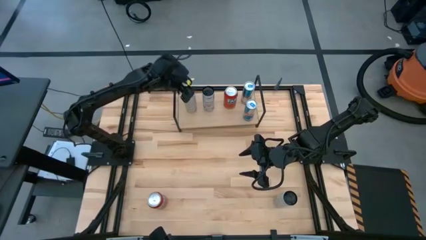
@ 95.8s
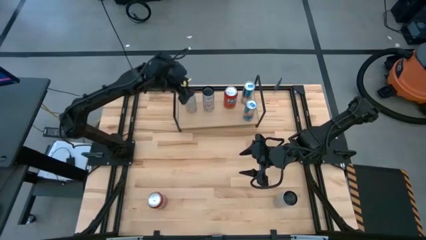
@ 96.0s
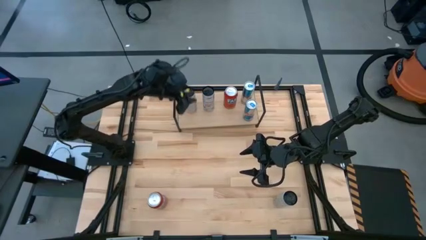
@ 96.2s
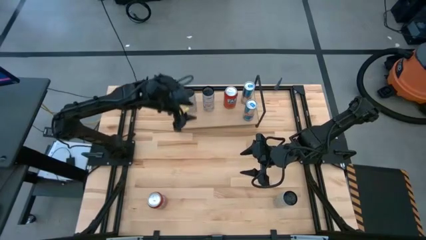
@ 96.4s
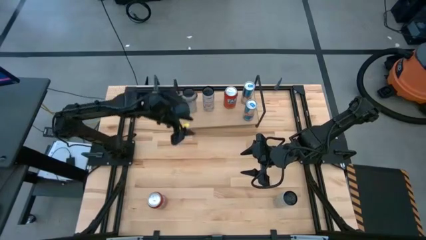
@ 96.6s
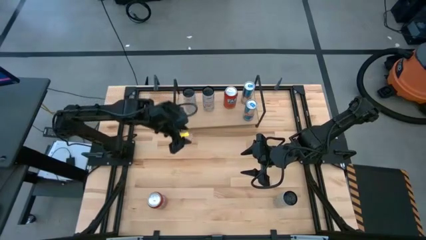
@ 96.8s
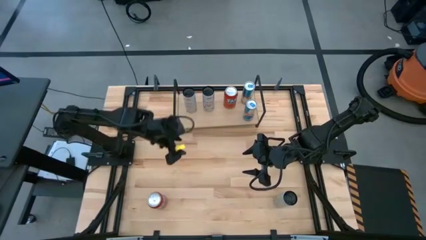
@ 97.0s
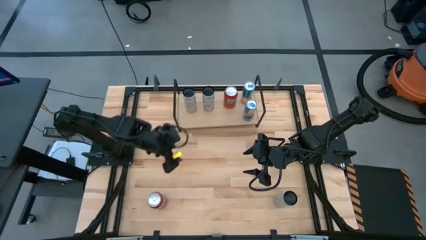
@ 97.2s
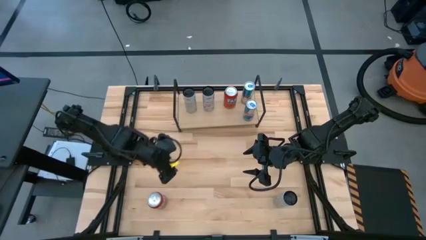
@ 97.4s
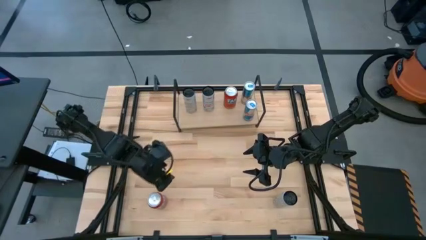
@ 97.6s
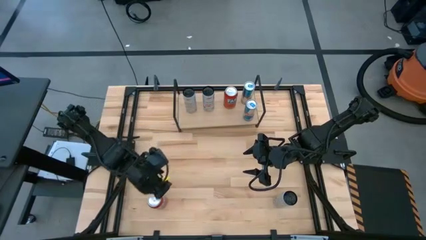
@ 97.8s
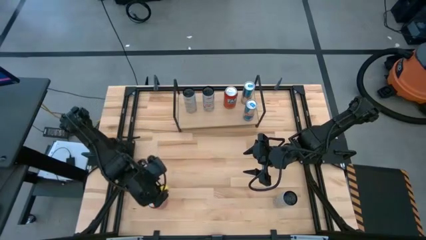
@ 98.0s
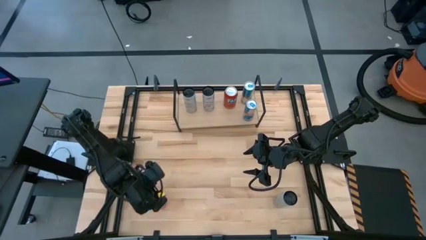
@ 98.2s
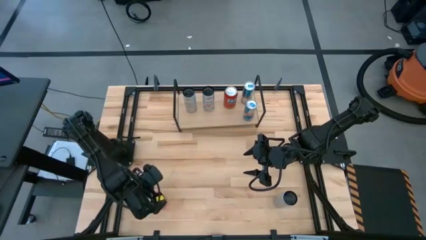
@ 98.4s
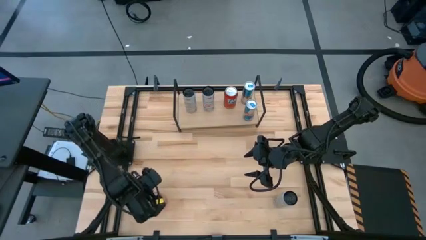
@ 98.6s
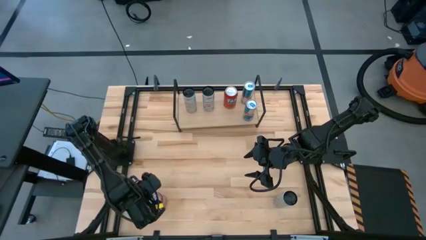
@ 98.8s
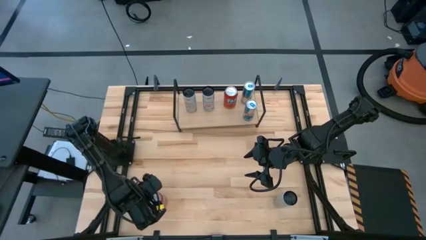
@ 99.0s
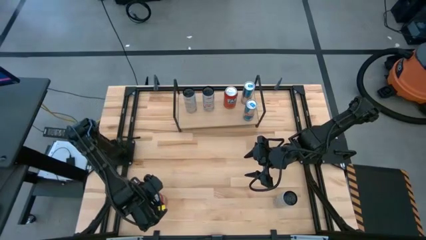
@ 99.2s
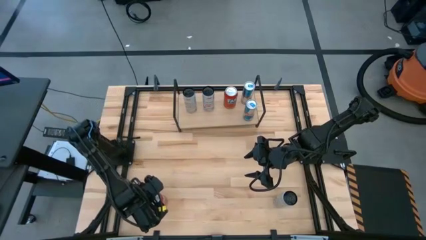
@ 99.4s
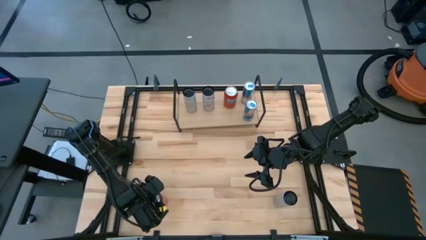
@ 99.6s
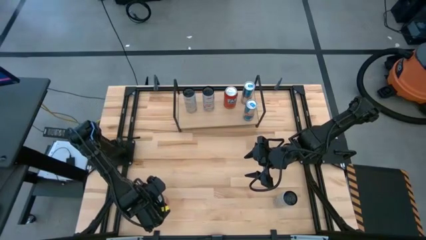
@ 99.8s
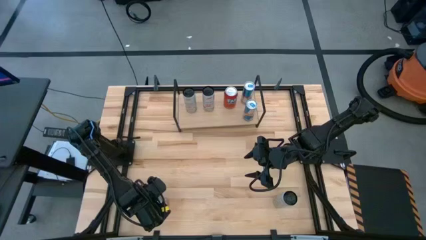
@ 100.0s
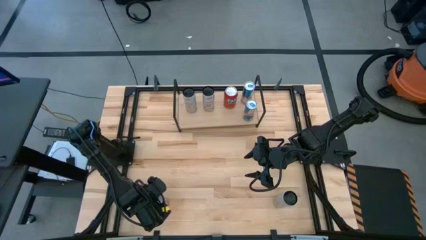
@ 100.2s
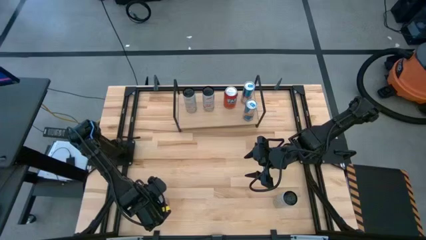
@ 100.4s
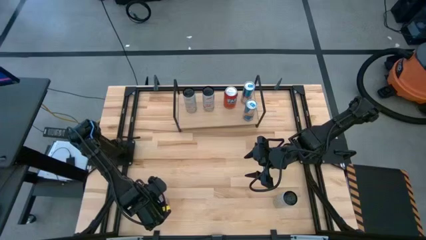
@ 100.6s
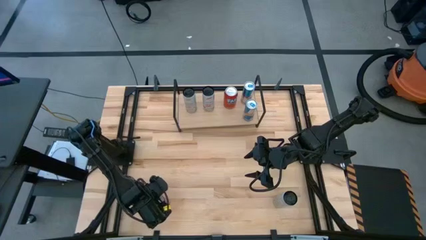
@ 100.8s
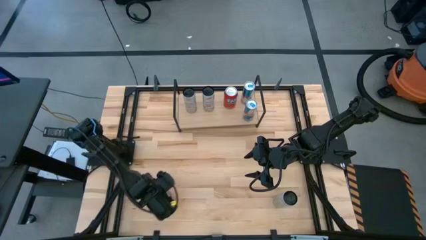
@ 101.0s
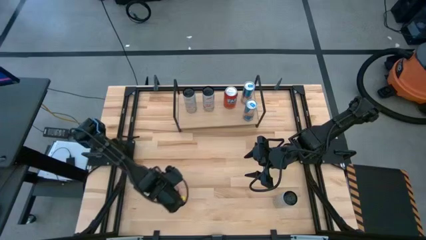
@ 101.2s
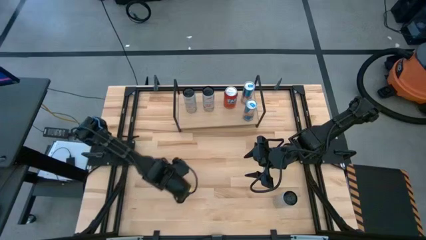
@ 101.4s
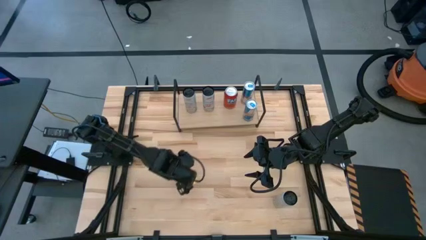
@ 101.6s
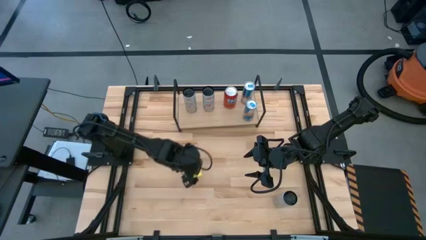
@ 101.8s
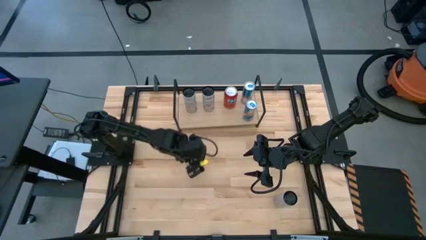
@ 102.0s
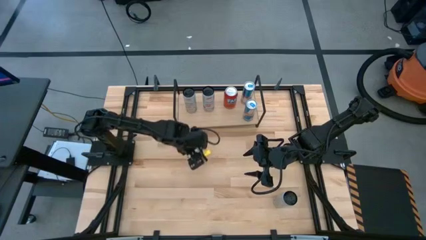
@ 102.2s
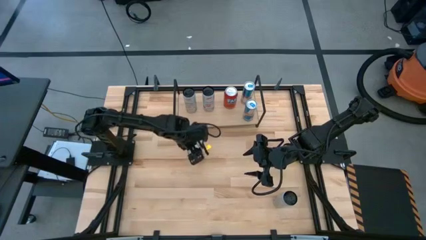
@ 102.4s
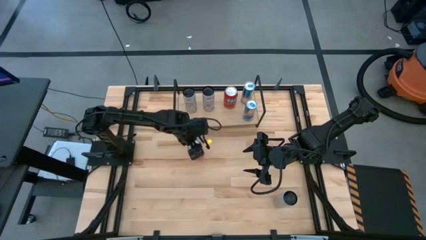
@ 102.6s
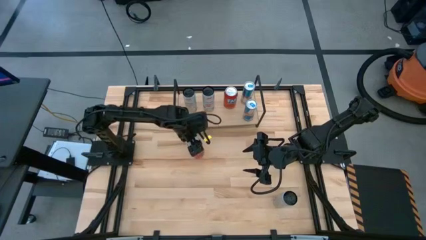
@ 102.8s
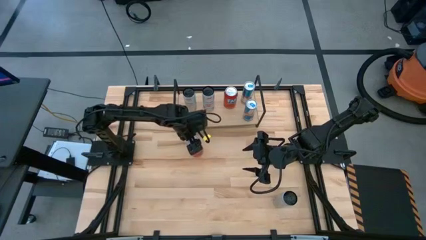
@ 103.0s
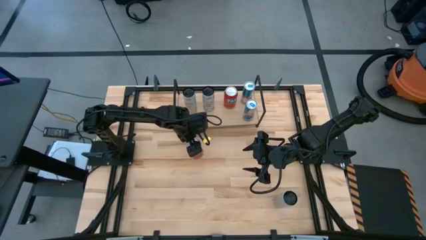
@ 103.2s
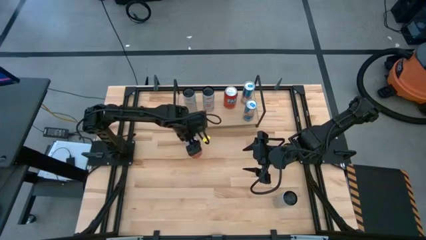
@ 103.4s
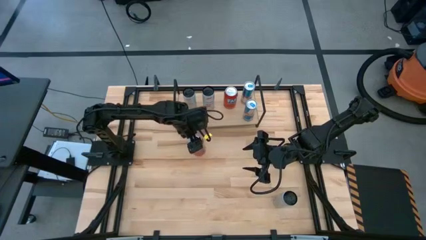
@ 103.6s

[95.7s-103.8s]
Task: Place canned beverage on shelf
Put the orange soda can aligned with the other orange soda can on the shelf

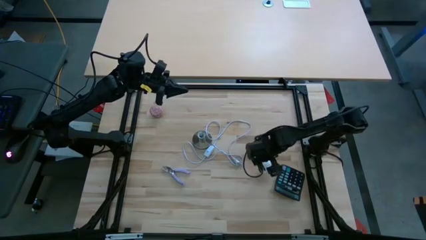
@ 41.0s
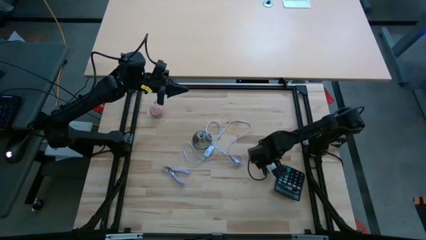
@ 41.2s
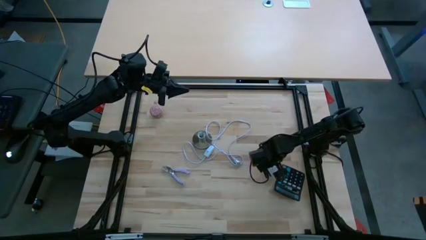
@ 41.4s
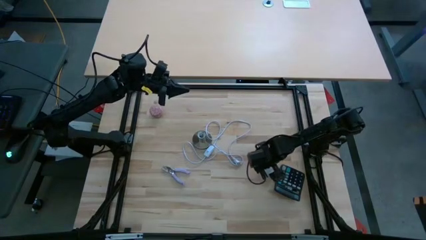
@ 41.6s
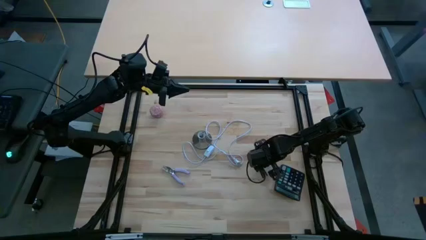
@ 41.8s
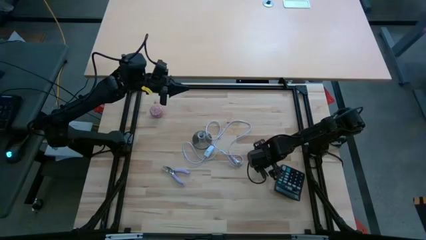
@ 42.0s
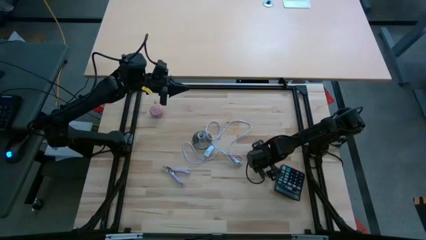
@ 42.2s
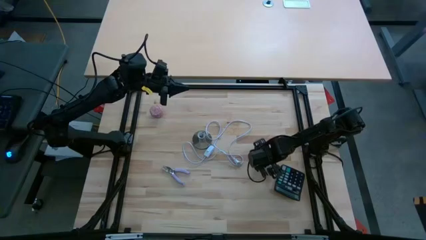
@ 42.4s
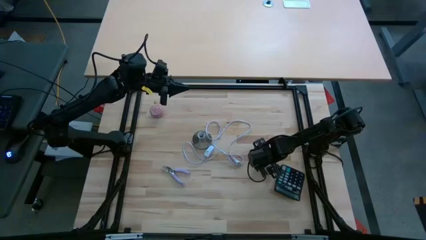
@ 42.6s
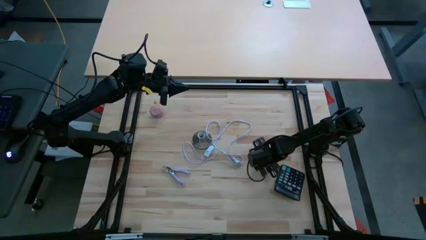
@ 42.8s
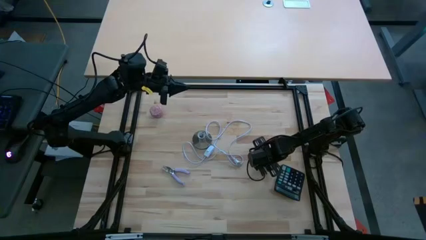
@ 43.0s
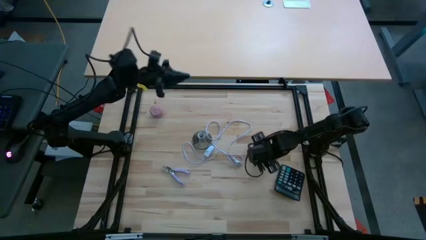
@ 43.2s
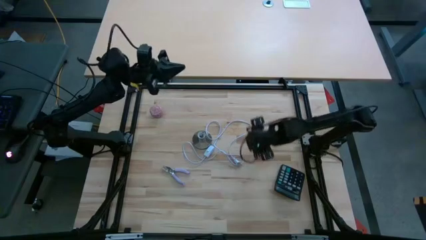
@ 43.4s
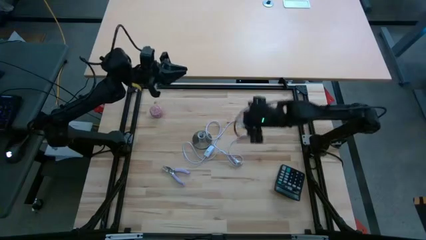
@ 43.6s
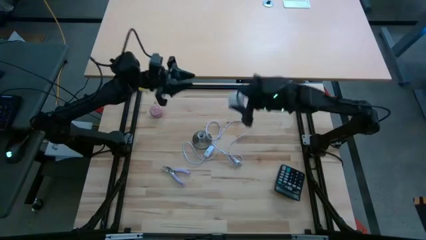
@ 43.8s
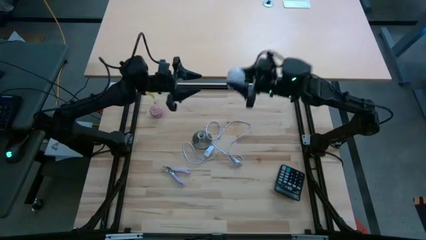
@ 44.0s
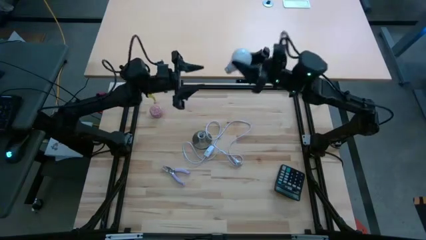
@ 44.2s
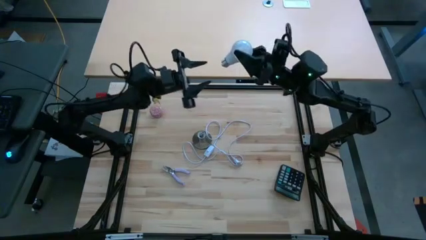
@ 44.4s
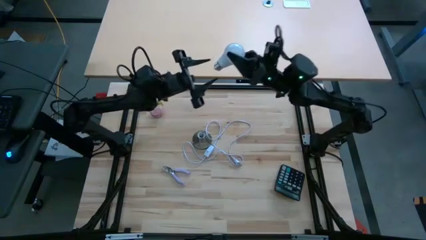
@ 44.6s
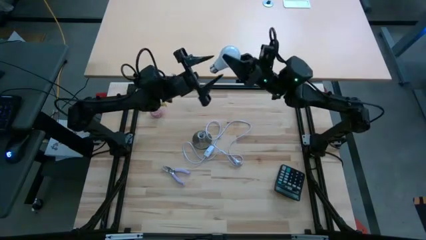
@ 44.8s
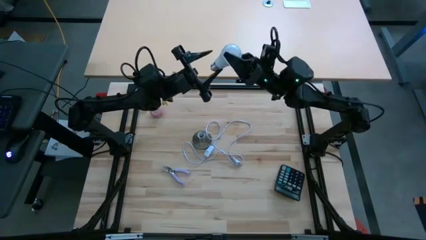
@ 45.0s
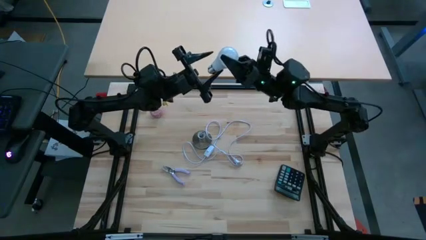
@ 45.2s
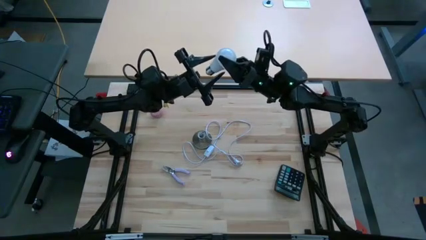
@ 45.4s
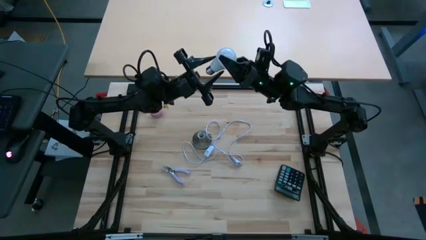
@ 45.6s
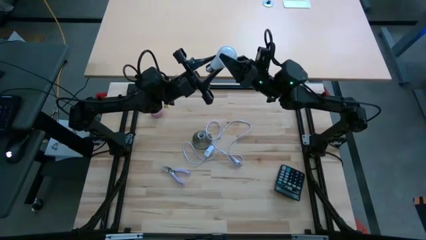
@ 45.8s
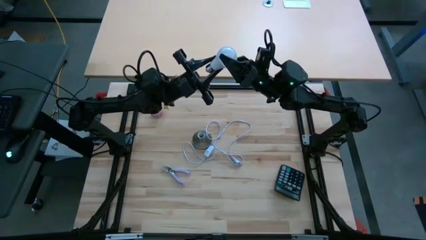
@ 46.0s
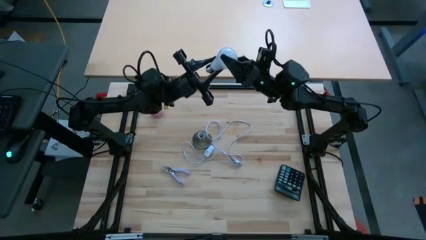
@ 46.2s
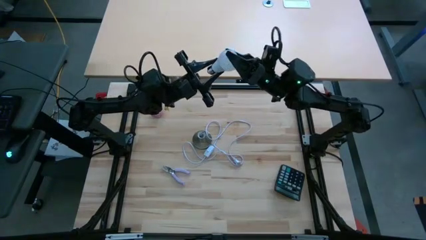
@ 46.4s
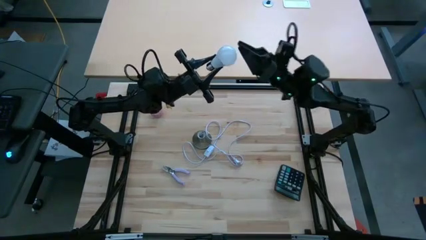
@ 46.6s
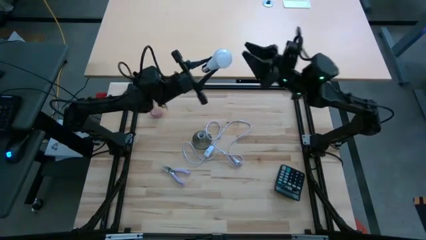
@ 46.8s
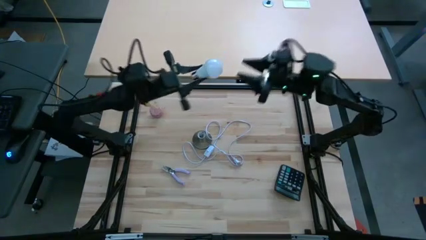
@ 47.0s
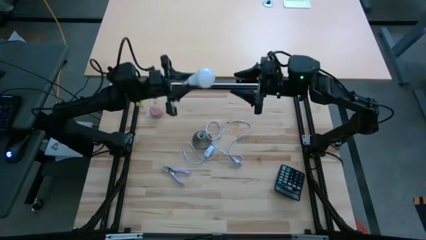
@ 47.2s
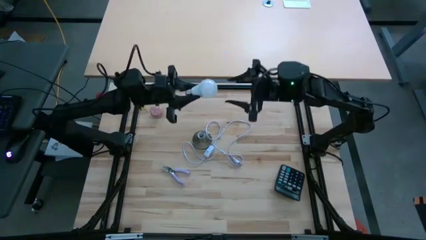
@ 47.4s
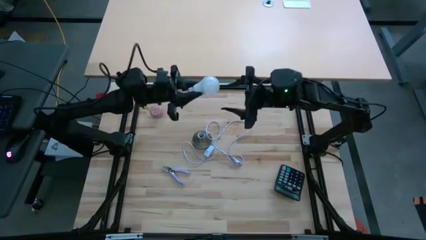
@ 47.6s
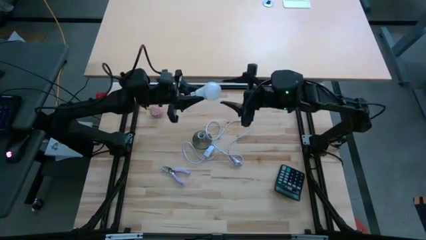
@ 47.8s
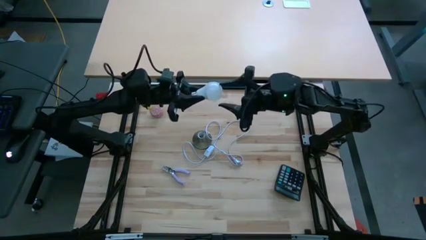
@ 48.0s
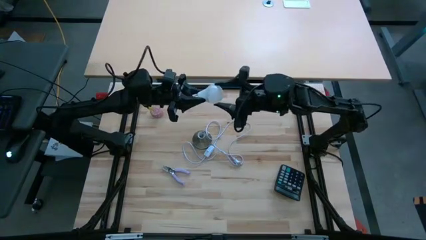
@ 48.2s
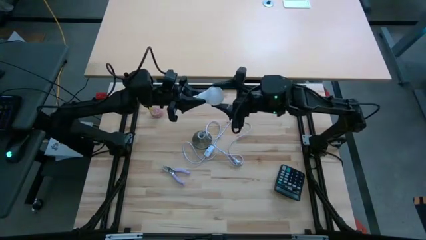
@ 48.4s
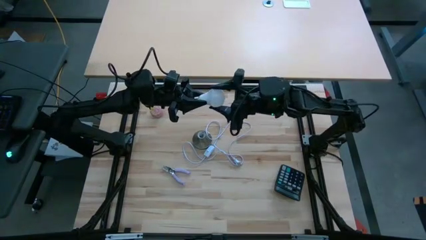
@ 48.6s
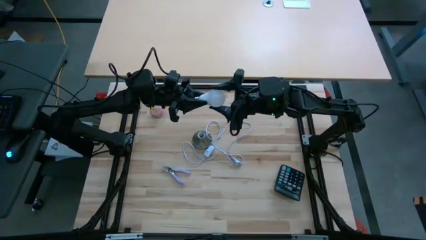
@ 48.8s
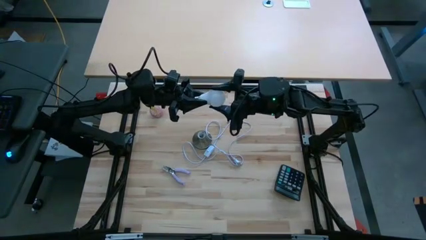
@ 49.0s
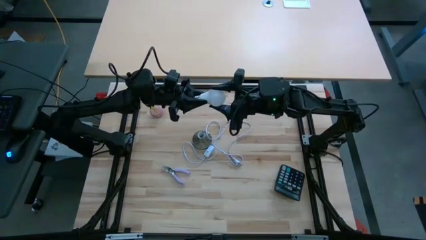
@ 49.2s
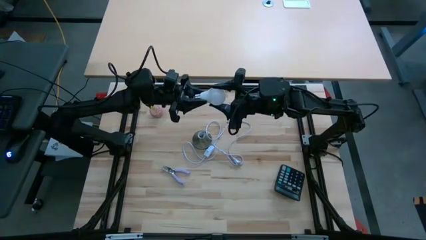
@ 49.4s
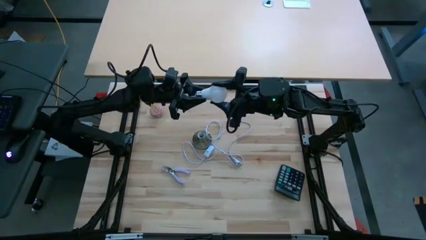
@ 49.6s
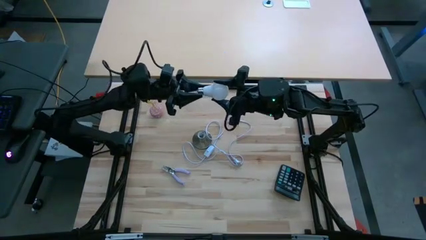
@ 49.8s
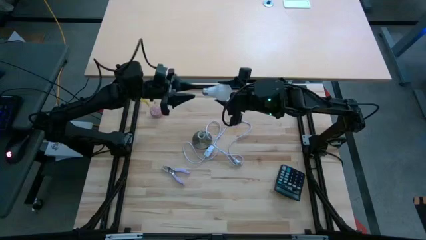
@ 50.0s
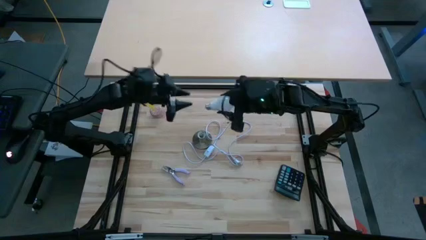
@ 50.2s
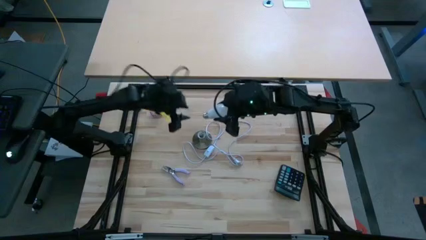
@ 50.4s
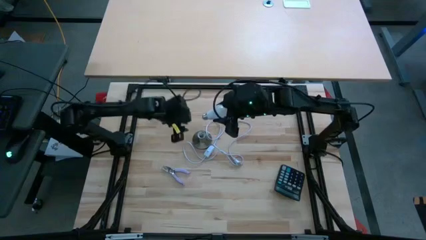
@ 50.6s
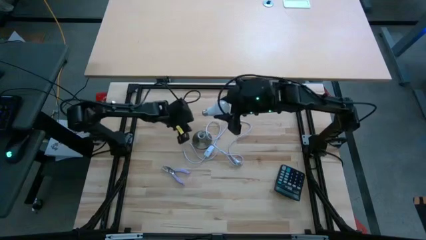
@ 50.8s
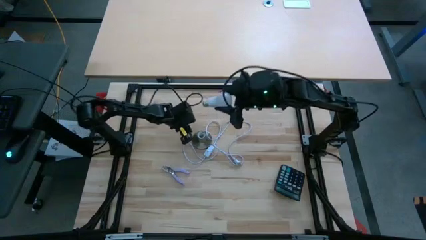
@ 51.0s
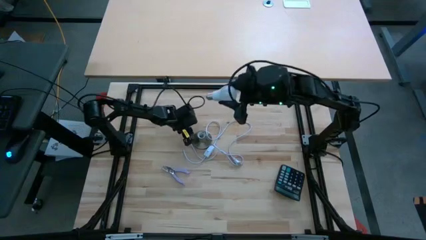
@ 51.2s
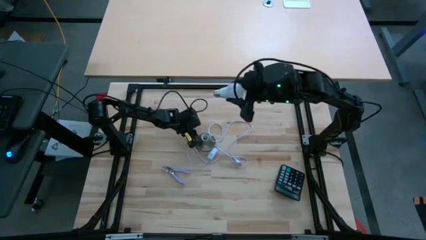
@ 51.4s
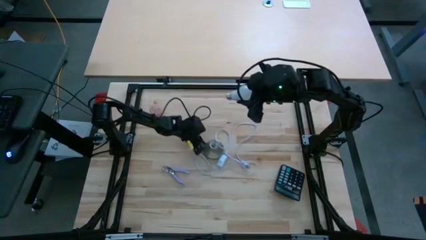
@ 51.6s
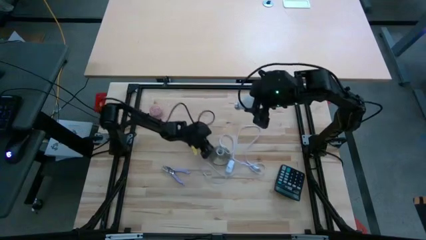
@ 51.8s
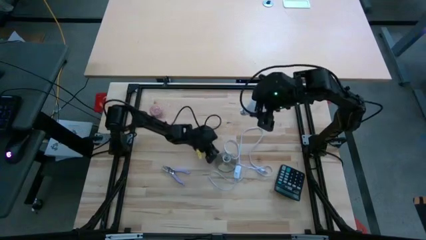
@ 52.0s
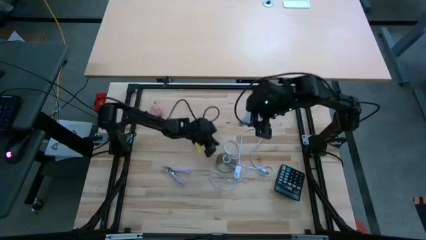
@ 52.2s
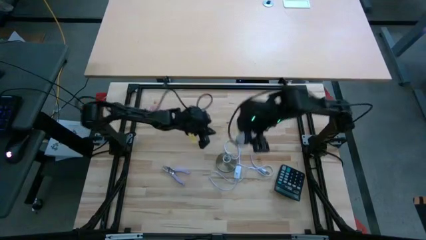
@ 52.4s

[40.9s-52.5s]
Task: Screw lightbulb
Insert the lightbulb into the lamp
